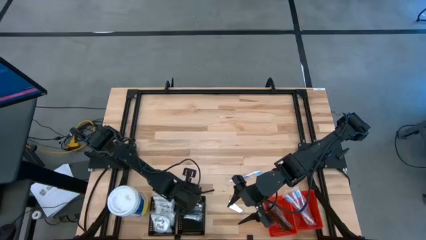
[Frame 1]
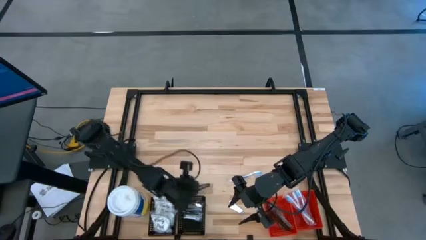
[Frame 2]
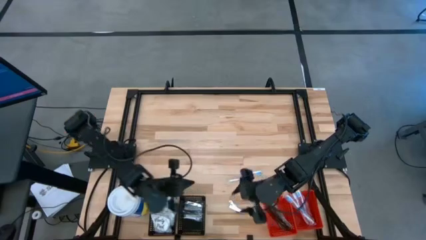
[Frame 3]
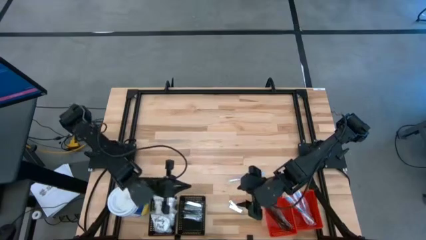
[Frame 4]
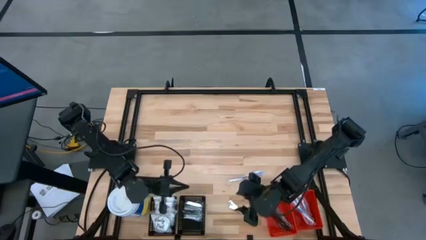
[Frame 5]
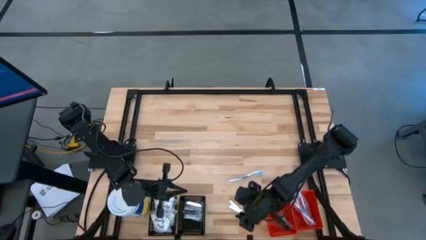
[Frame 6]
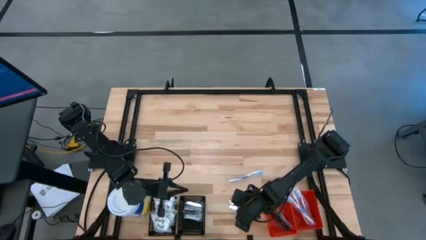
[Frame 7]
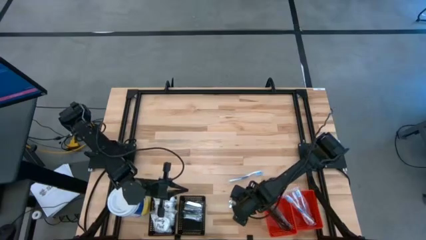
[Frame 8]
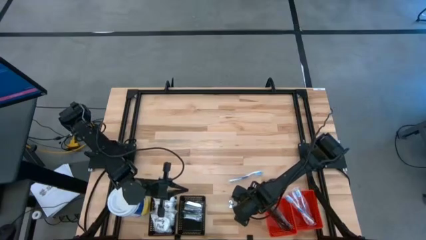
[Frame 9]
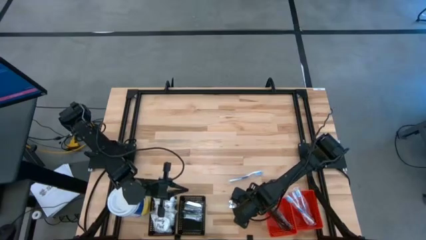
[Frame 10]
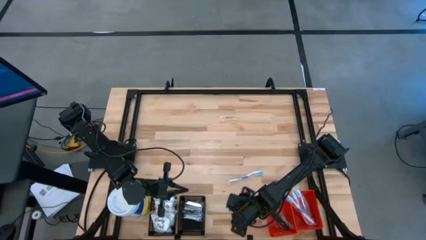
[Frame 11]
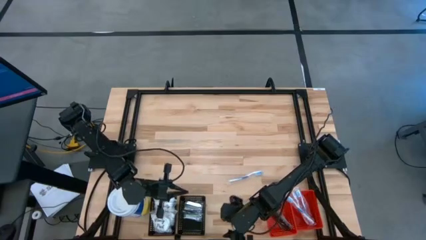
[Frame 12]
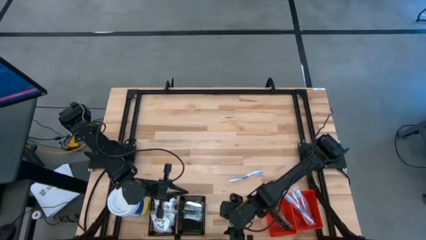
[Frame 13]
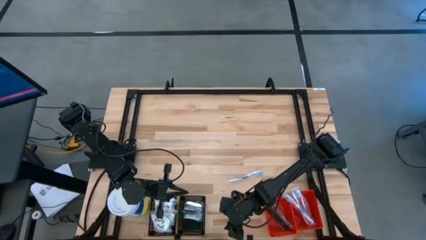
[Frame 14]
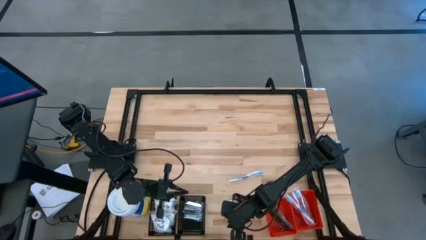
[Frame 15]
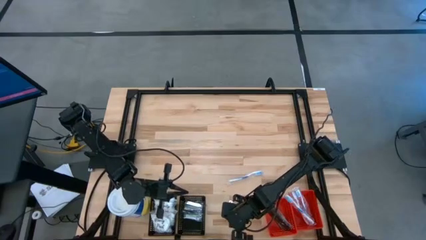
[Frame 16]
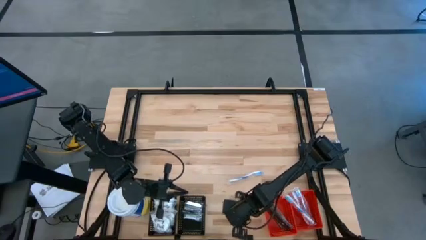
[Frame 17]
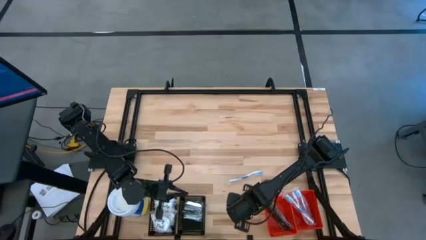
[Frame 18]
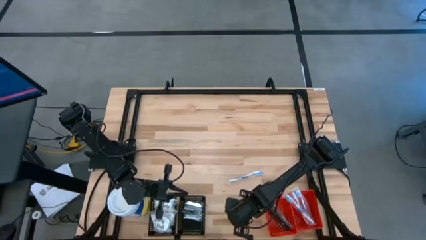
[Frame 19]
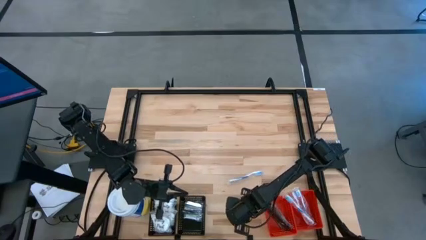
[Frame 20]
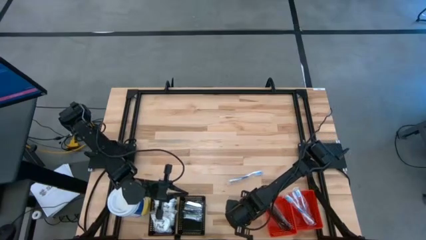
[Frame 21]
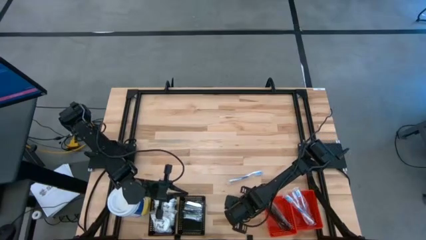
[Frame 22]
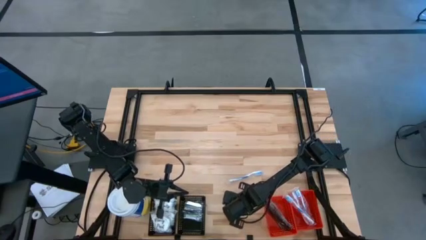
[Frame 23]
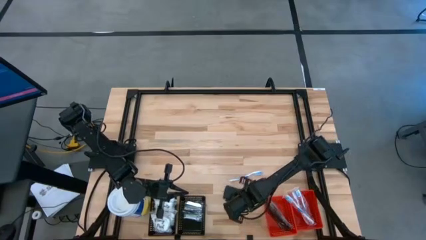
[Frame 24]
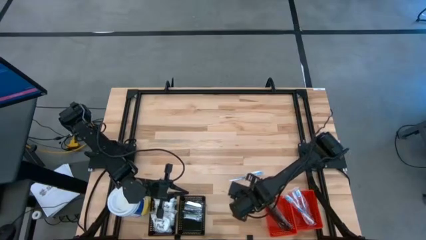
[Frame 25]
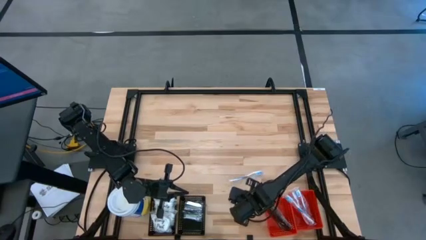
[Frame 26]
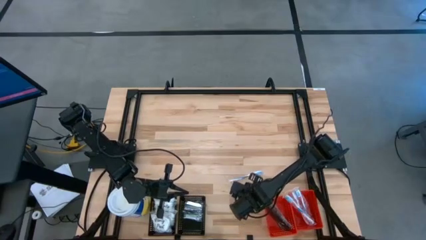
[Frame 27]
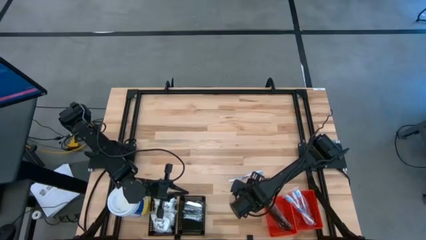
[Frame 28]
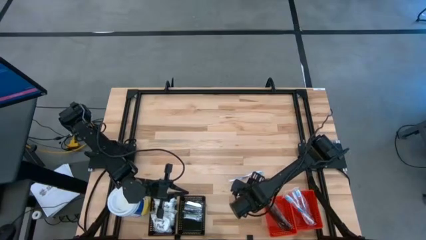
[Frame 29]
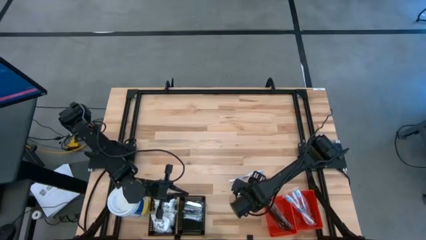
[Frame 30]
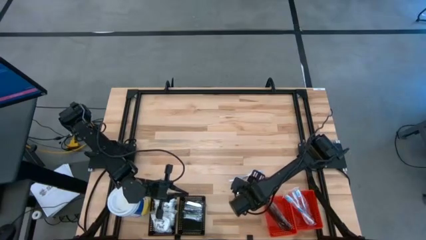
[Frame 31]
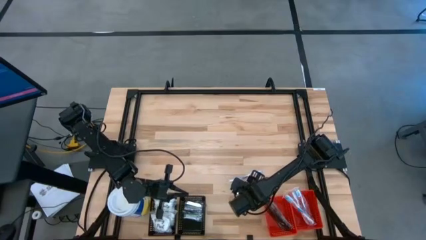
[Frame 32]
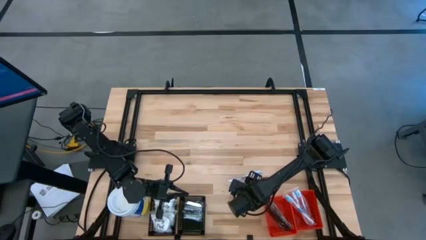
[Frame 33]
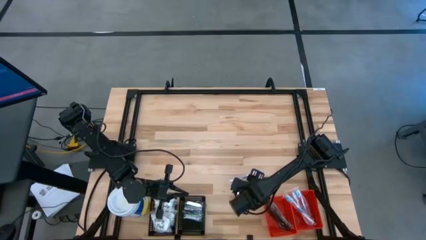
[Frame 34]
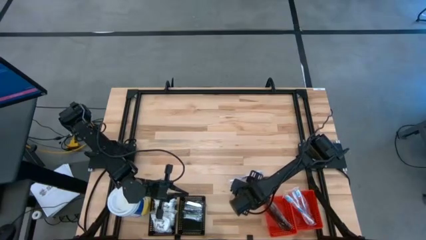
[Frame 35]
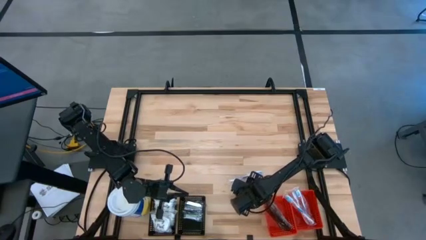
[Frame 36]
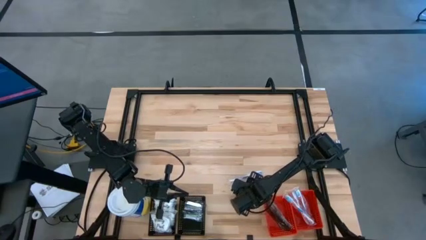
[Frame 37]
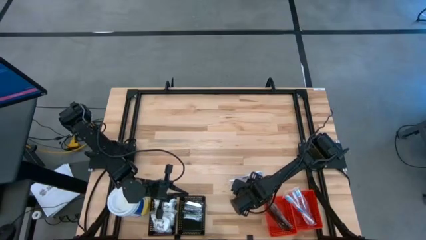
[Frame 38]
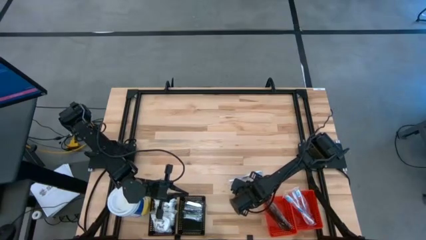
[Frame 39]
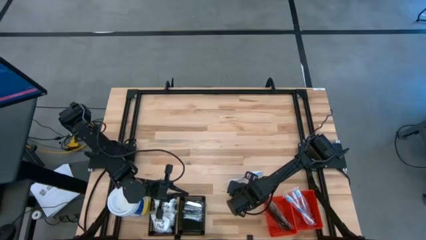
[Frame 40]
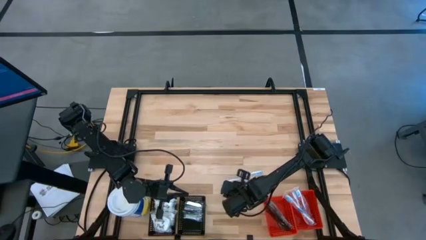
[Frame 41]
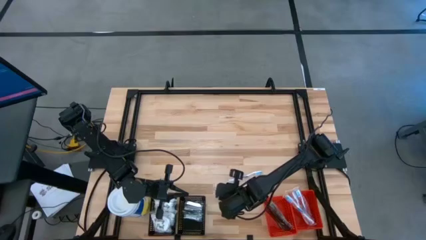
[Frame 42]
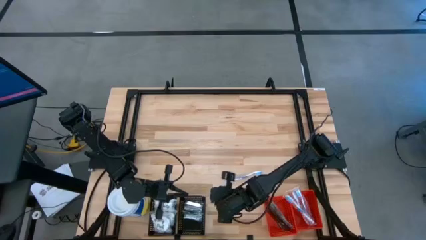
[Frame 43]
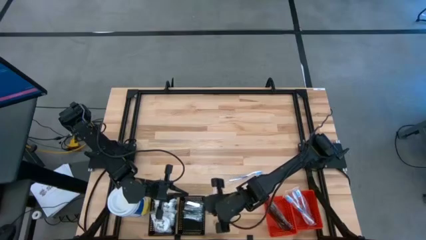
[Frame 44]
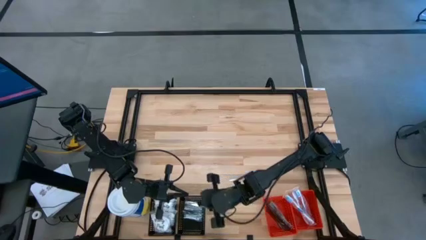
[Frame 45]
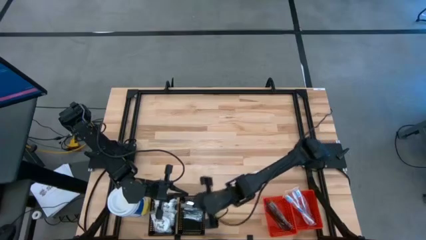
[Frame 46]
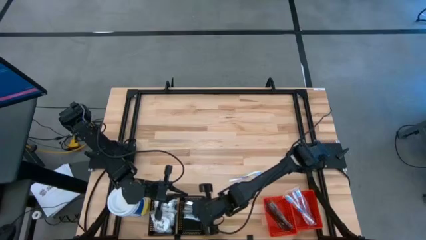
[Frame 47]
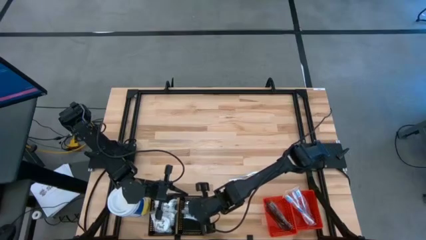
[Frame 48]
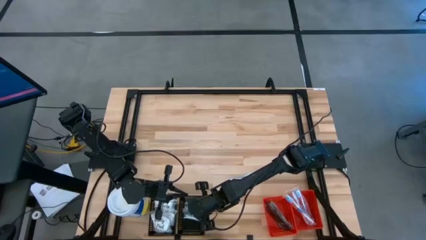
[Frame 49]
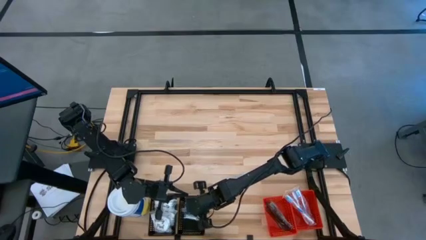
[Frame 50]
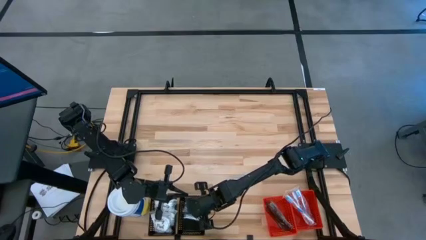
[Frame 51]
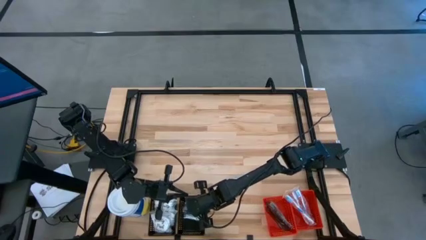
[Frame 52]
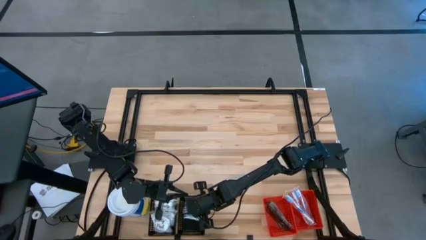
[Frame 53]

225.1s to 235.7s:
Task: Pick & Place Travel size toiletries
Put the nail cutter into the right black bin

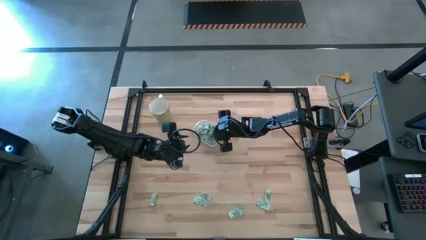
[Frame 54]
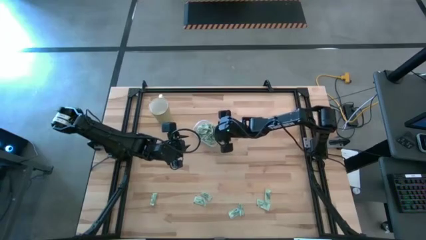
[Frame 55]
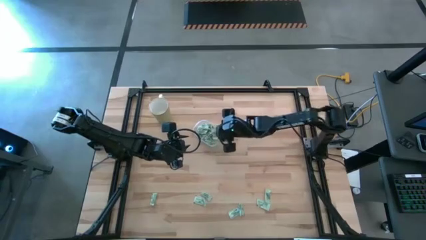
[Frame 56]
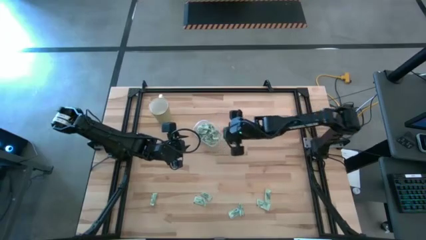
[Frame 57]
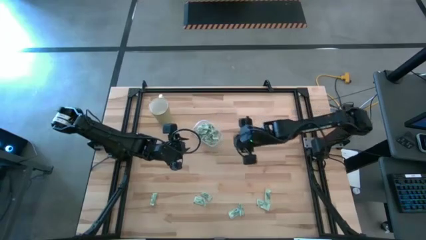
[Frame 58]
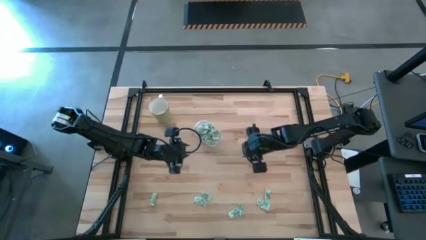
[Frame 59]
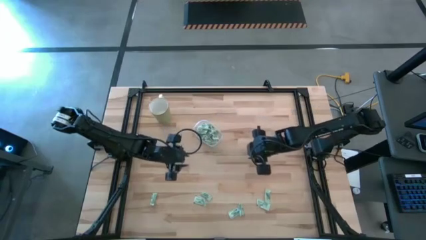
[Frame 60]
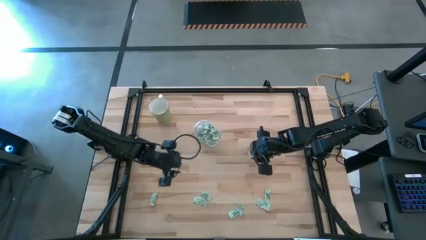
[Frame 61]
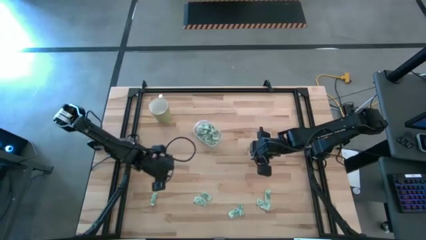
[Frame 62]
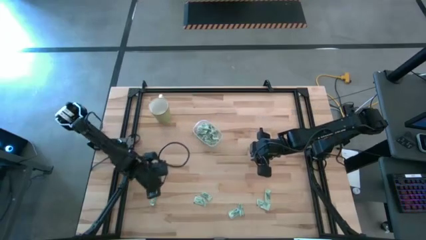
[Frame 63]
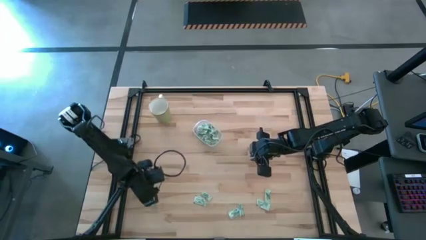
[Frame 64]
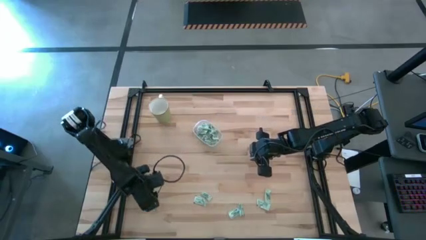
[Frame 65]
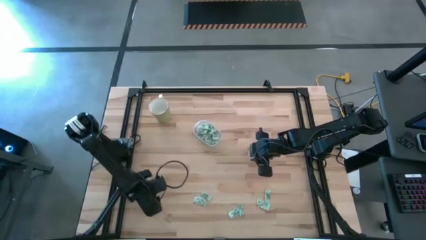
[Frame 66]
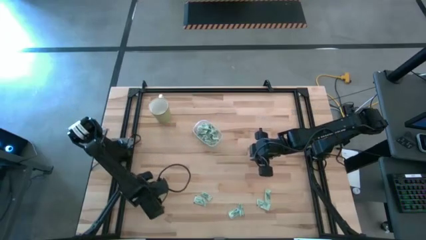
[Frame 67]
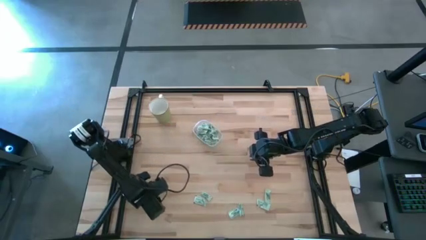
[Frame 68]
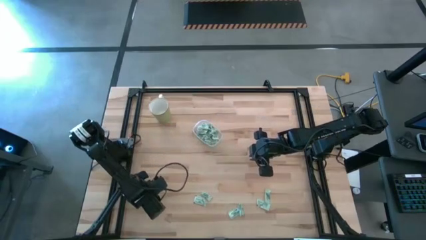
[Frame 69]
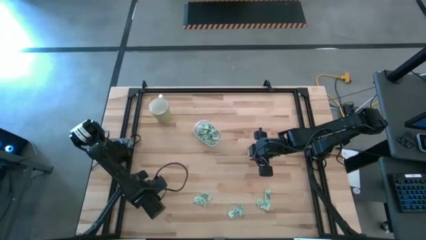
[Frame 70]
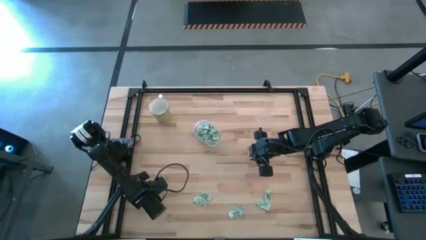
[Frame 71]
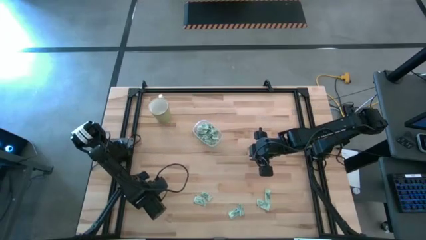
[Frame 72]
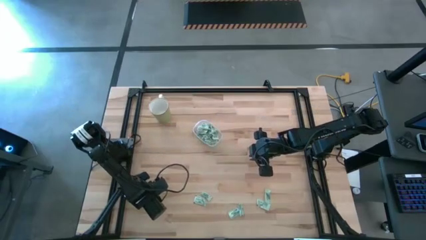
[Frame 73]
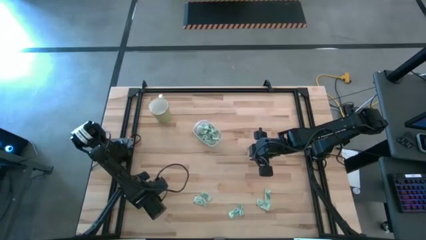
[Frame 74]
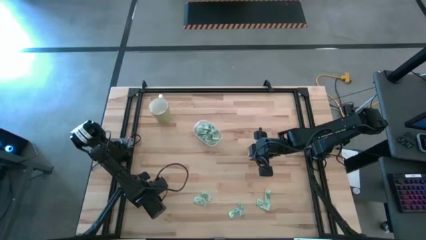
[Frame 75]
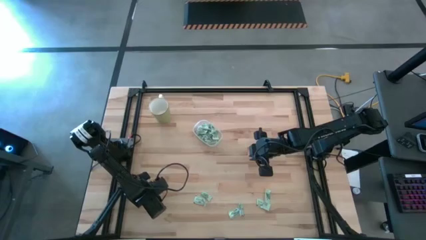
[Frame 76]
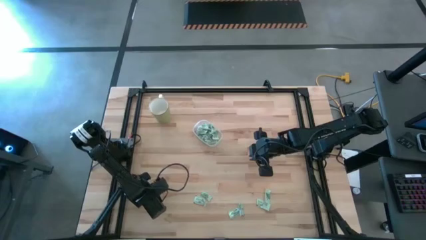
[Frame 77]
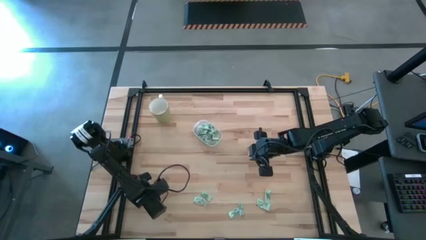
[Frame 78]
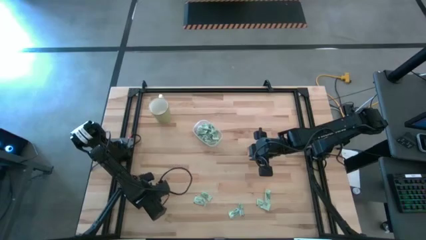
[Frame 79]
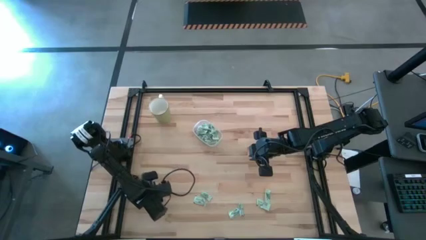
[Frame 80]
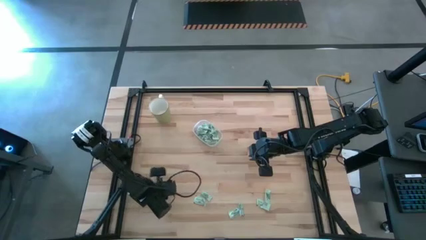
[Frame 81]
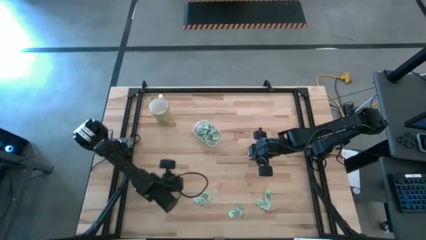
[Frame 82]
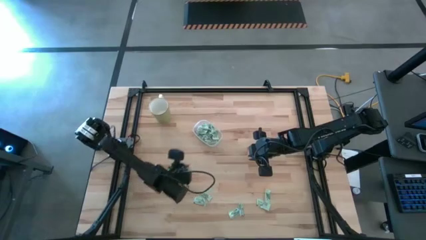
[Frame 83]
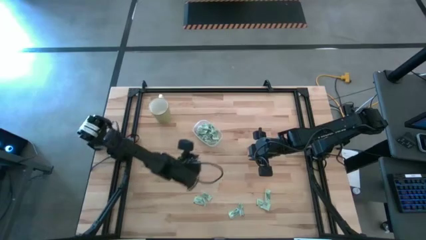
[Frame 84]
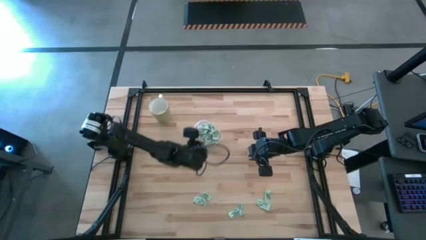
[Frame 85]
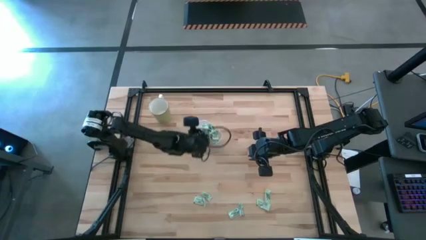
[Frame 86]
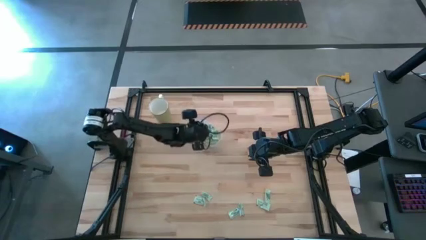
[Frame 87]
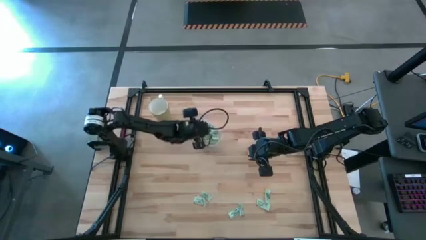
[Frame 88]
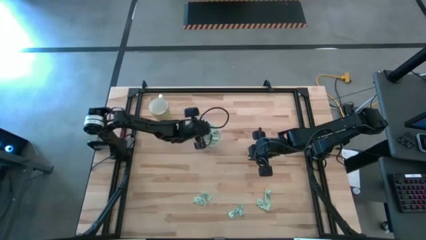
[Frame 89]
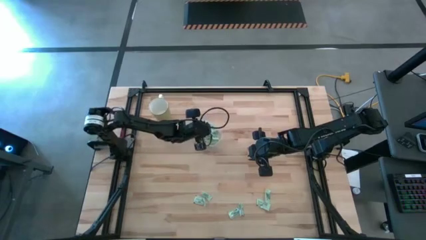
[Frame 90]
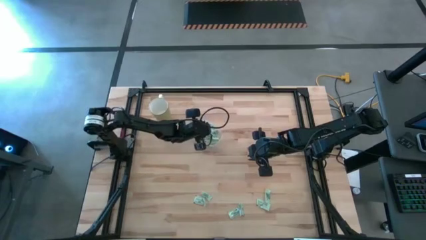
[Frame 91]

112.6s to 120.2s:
Task: Pick and place Stevia / Truvia into bins
Put the stevia packet into the transparent container
